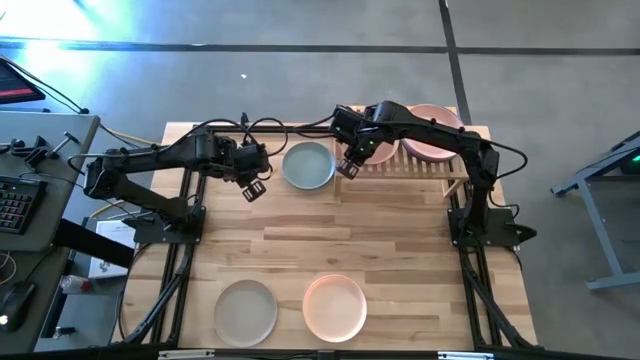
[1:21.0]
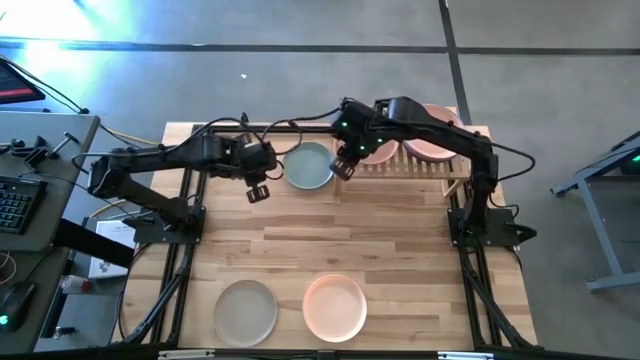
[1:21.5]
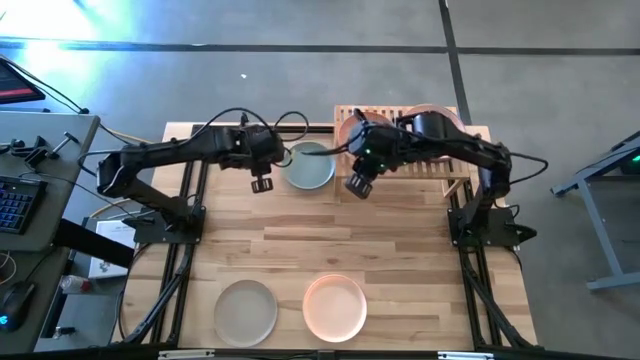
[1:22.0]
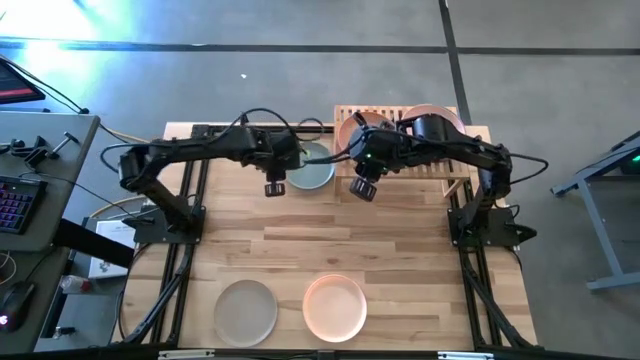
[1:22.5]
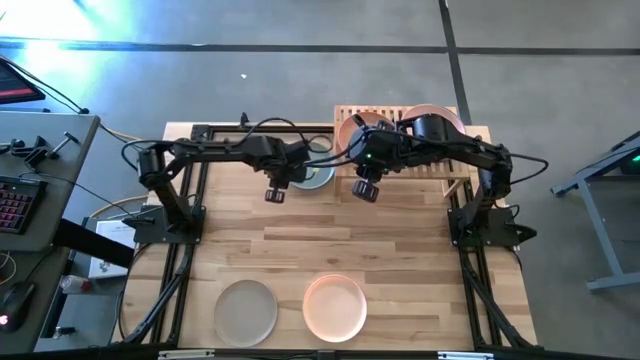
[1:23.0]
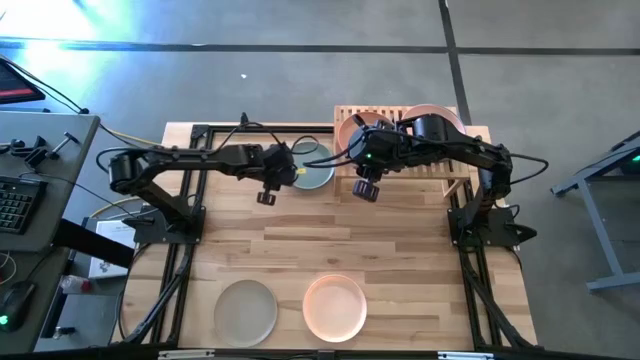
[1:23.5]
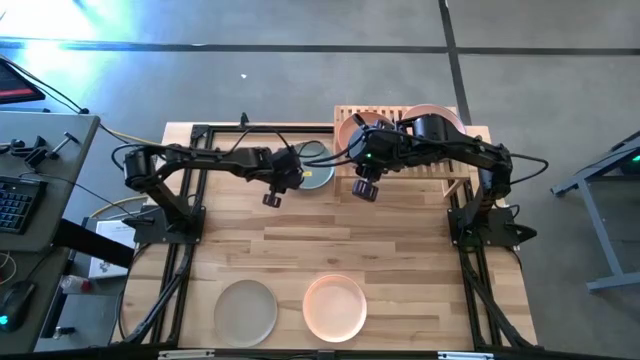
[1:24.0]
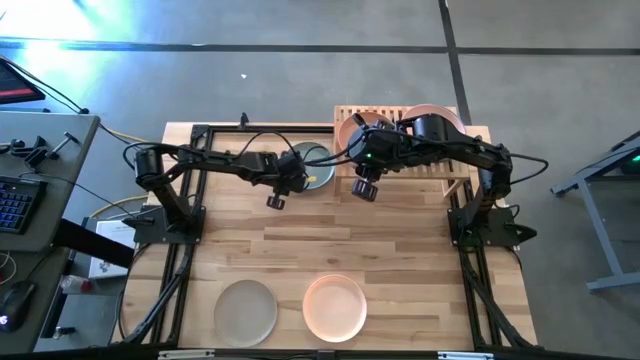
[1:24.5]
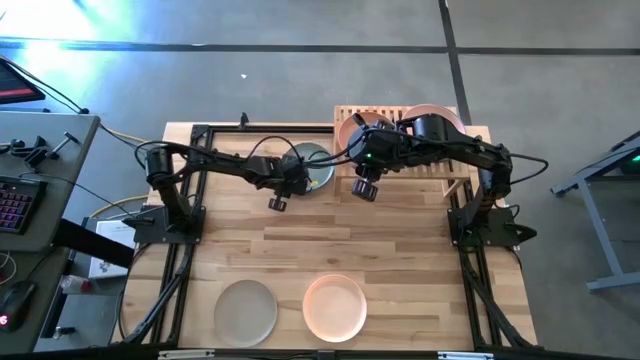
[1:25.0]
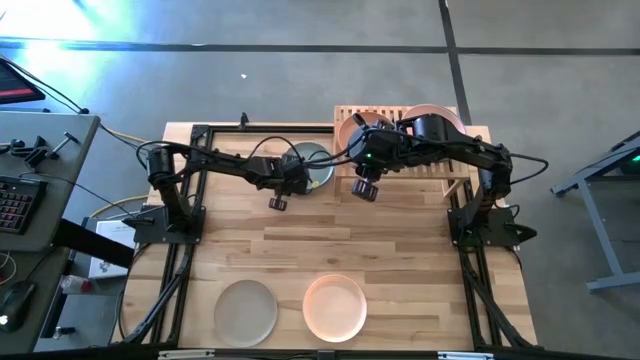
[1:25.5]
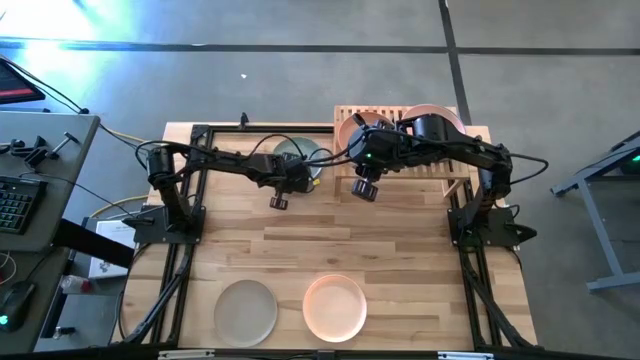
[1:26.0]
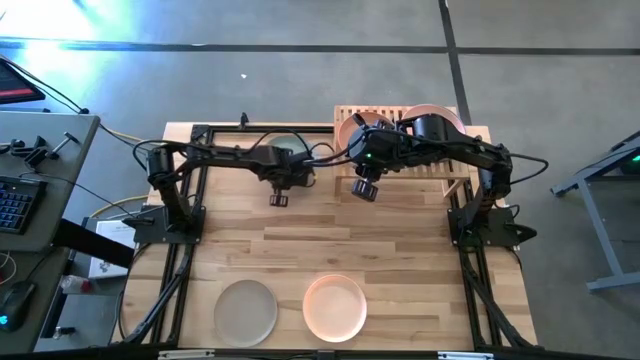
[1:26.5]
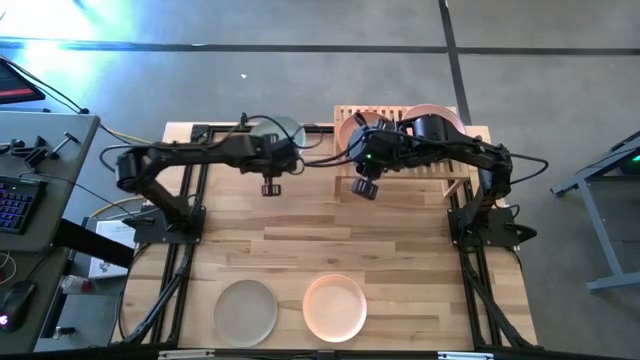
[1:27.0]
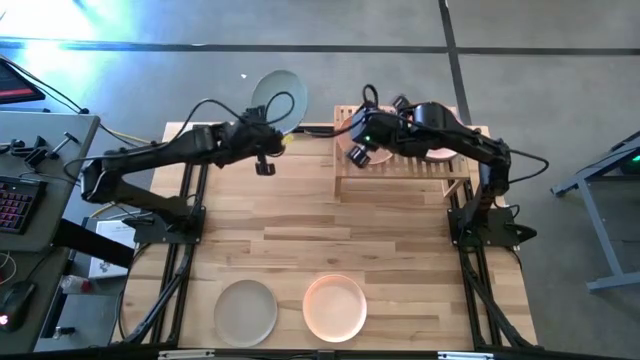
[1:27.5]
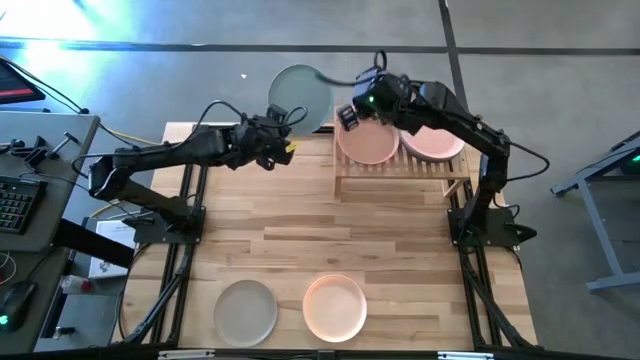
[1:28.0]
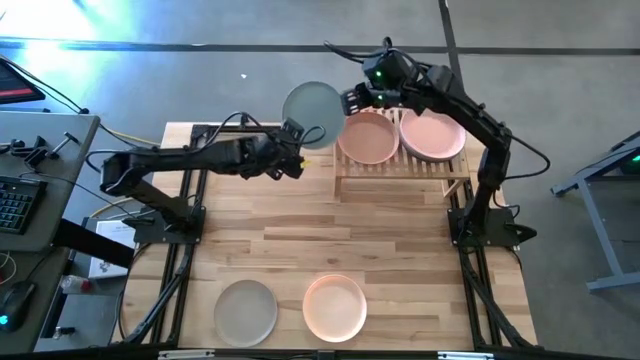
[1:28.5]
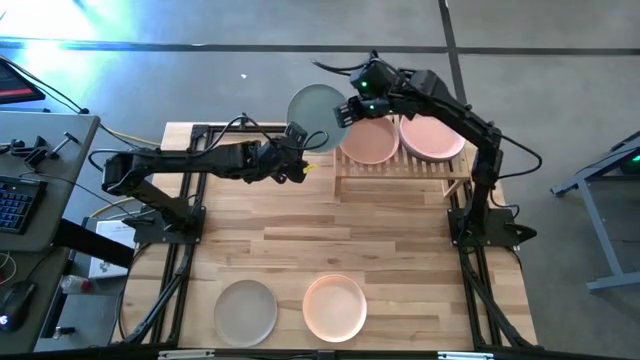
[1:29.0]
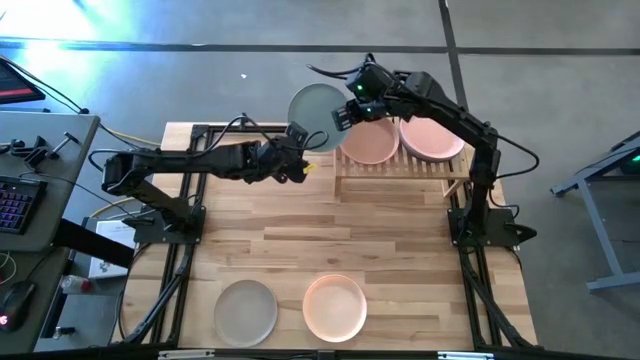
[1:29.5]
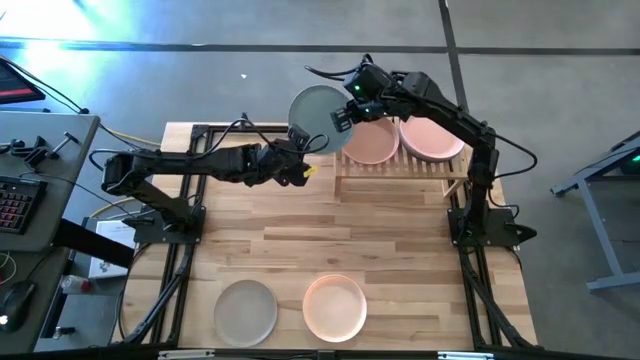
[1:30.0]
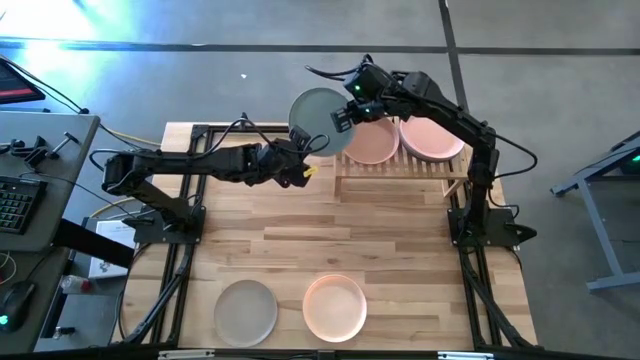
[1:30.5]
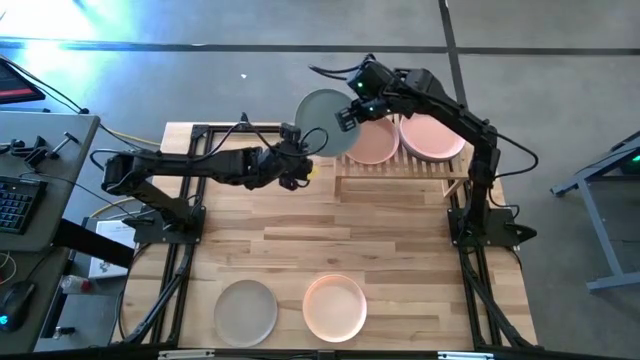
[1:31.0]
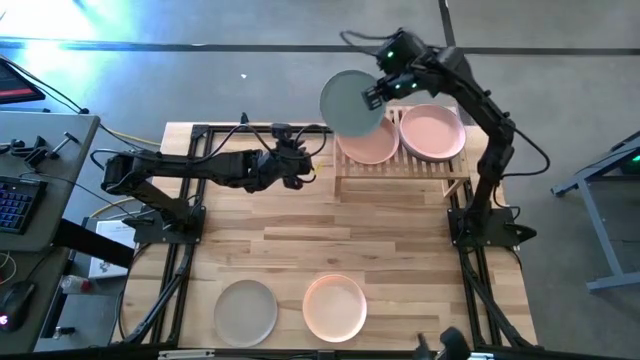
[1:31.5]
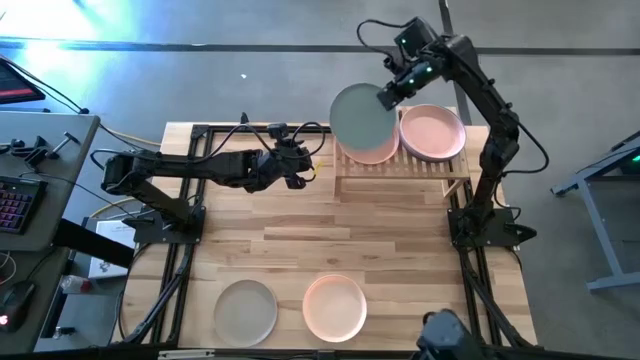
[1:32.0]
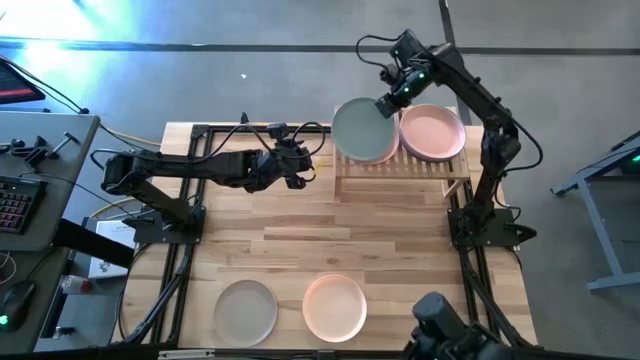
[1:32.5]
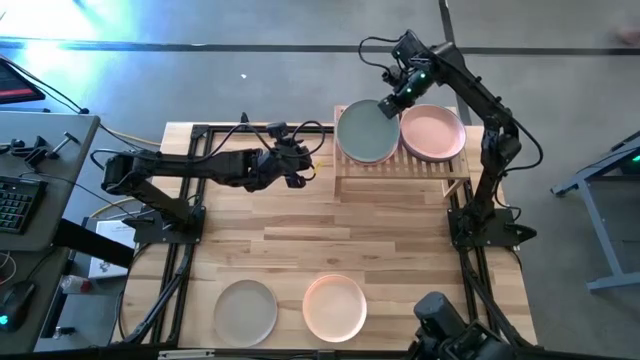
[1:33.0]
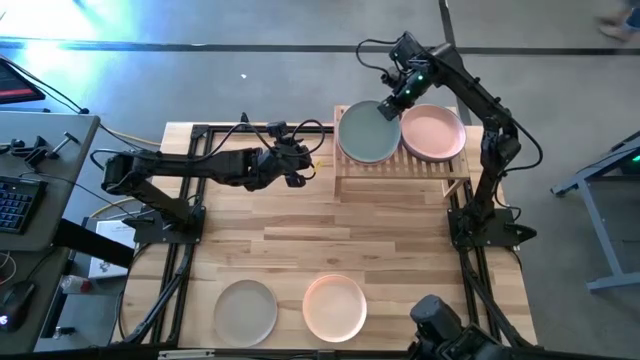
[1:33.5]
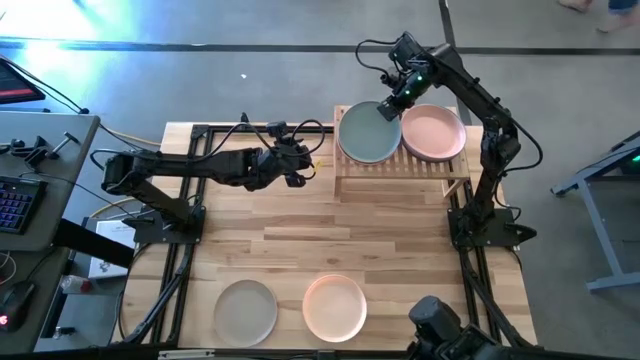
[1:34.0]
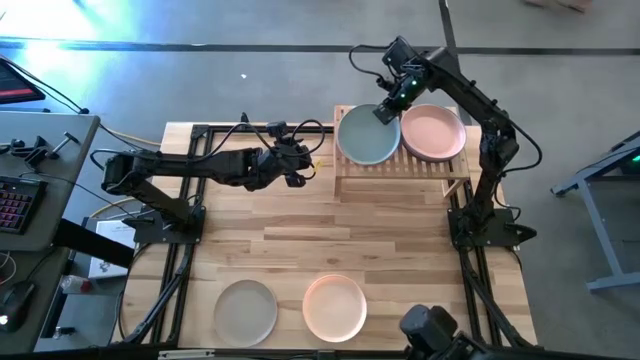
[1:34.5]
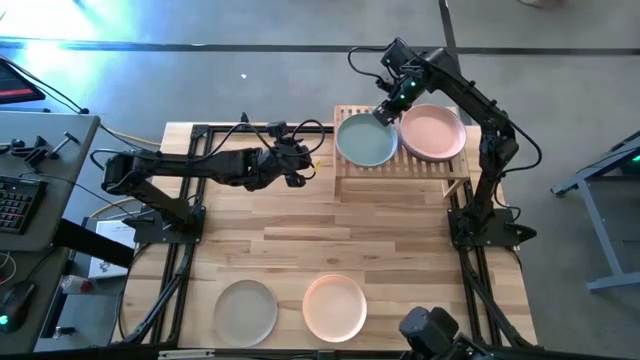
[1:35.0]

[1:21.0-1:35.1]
Task: Place and stack plates onto a shelf
Stack the light blue plate on the top of the light brown plate on the shelf

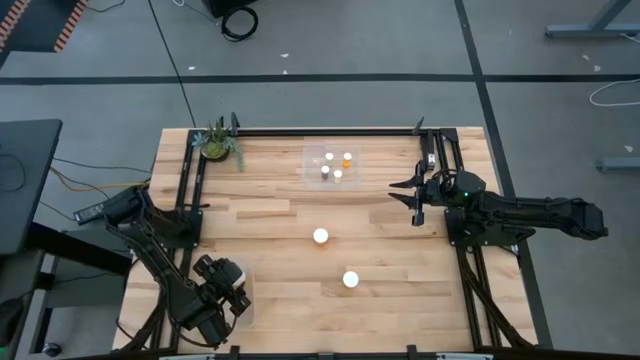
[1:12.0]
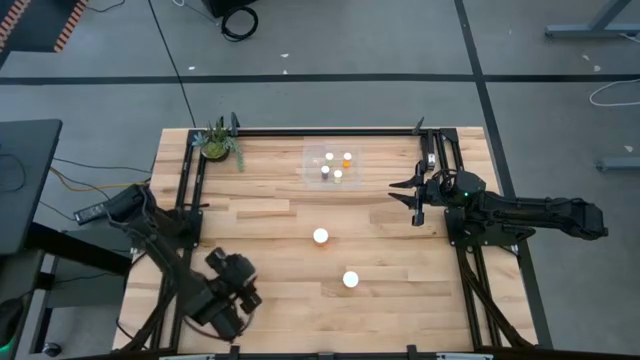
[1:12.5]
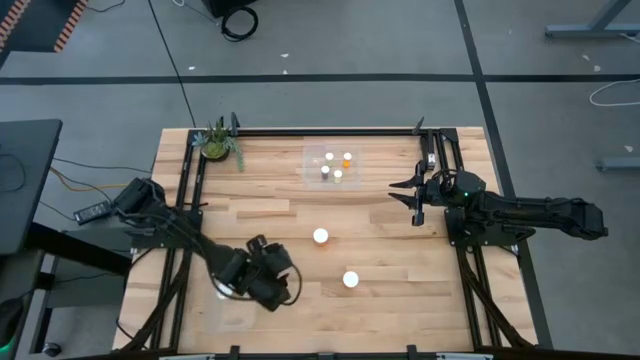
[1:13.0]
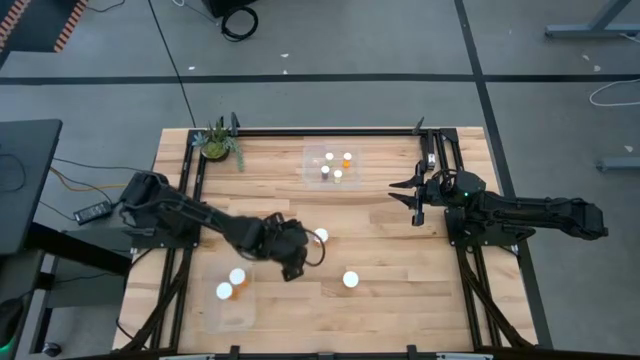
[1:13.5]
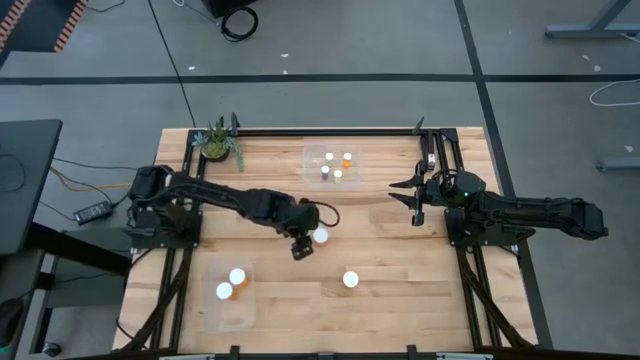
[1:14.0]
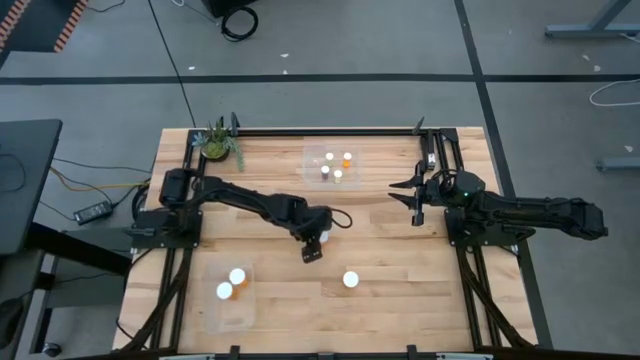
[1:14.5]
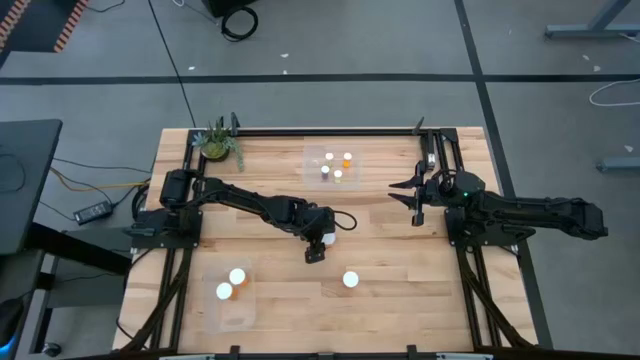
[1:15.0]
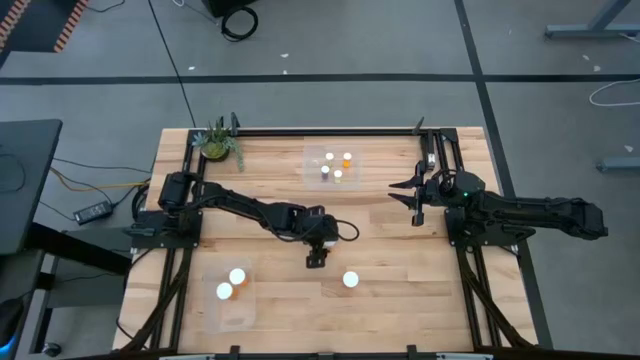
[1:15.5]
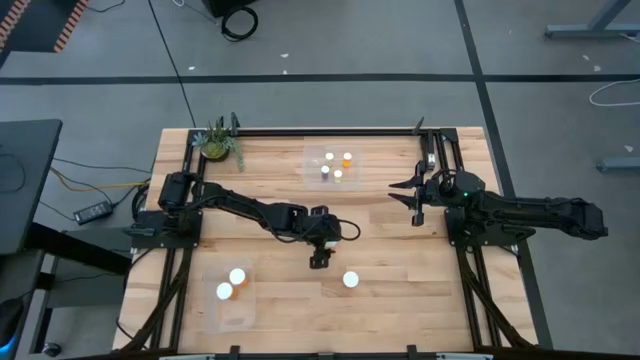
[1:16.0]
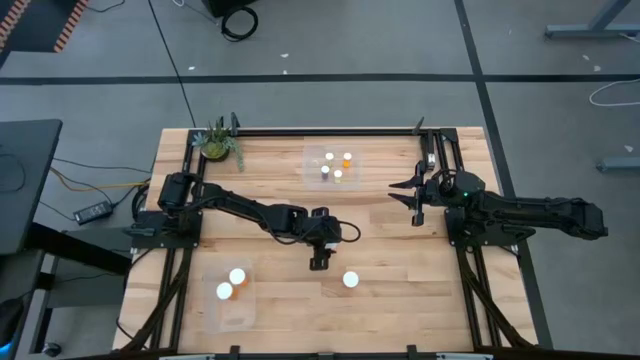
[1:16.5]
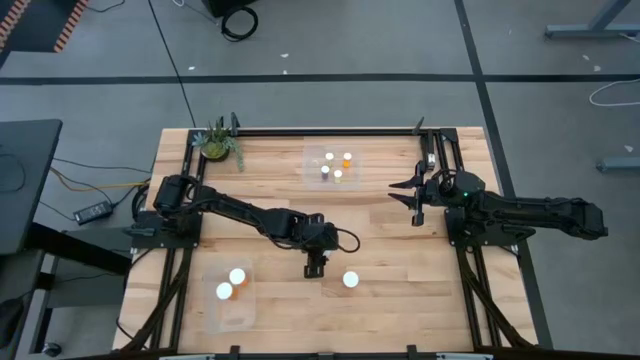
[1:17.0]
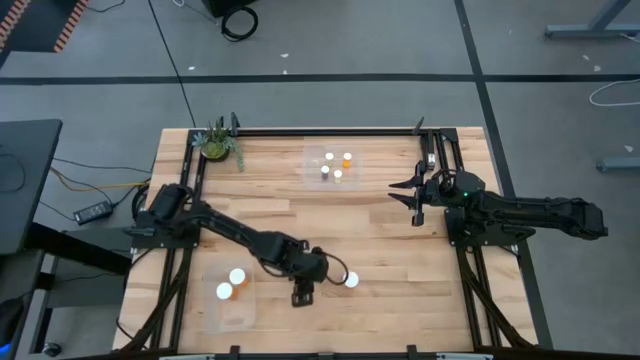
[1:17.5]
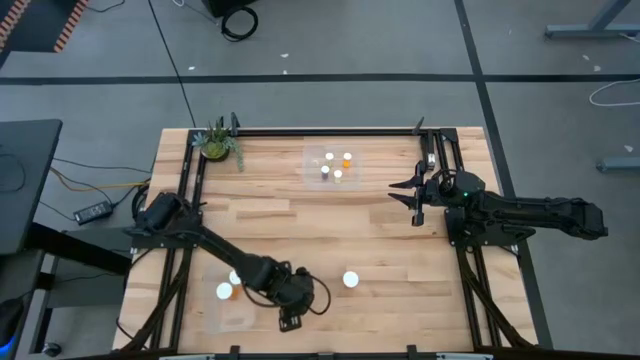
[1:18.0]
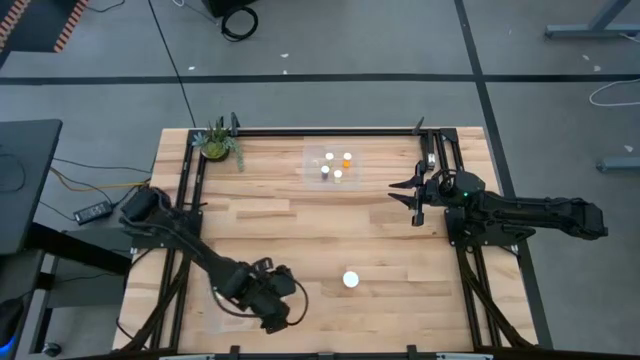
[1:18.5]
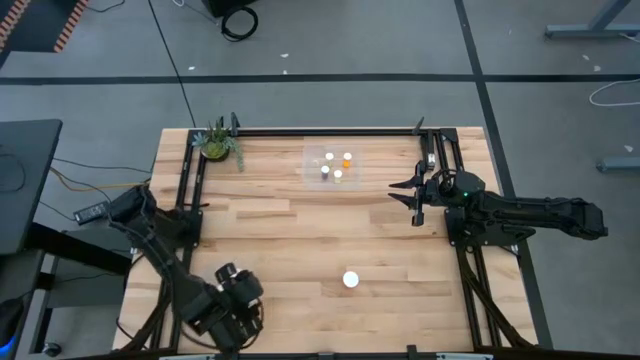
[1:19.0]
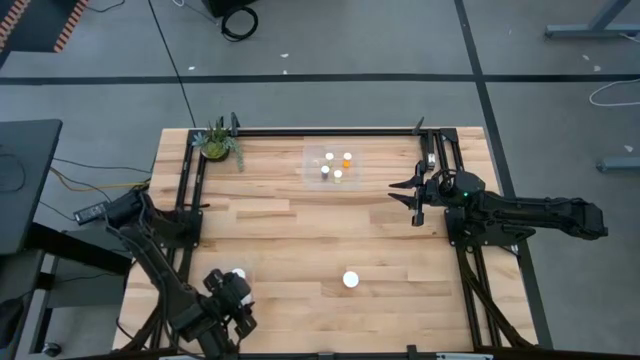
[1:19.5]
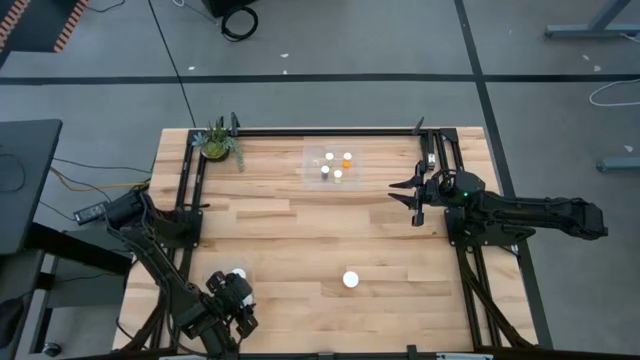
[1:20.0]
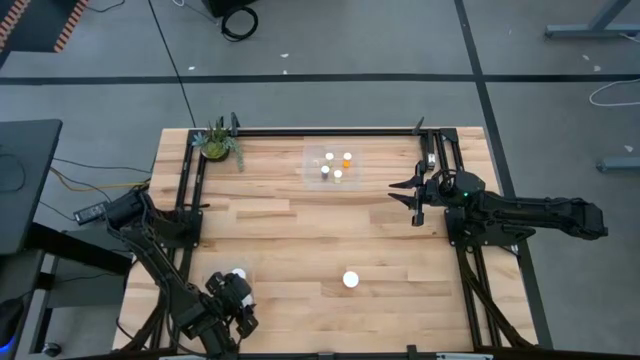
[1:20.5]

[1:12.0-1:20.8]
Task: Pick and place medicine bottles into bin by pill shape (circle, oval)
Put the orange capsule bottle into the bottom transparent bin
